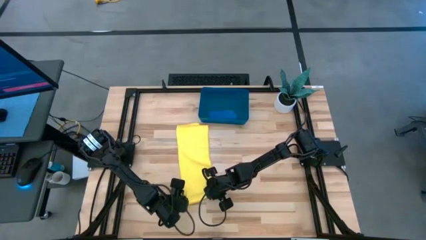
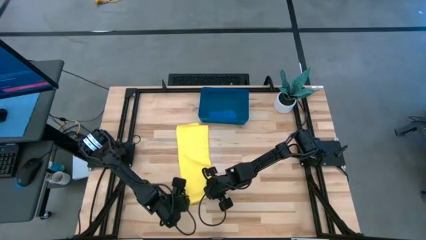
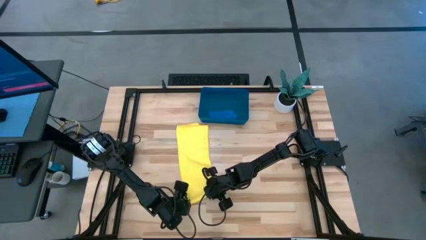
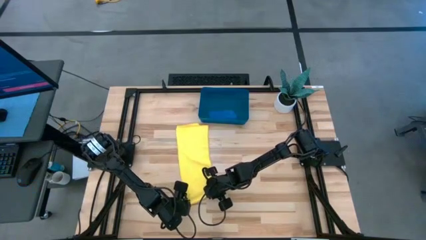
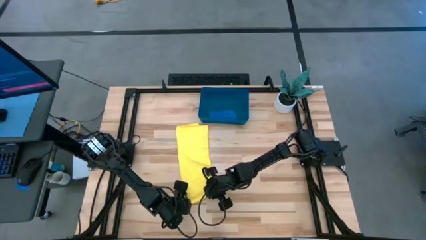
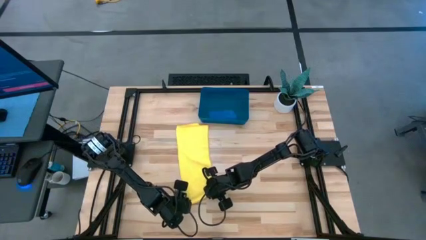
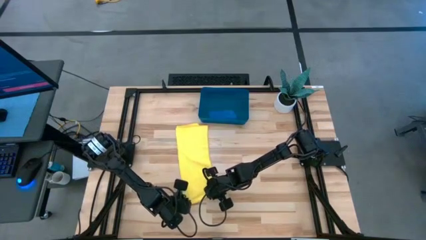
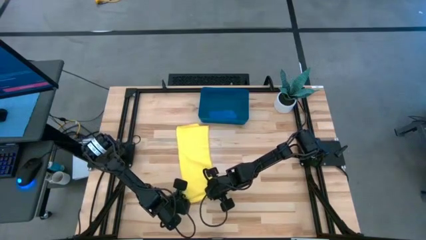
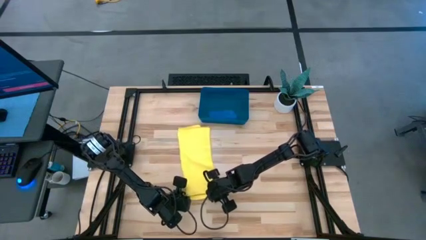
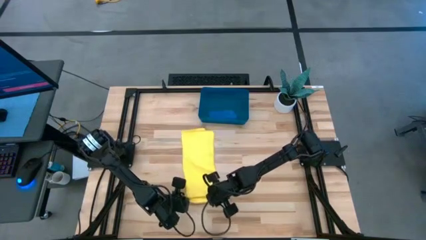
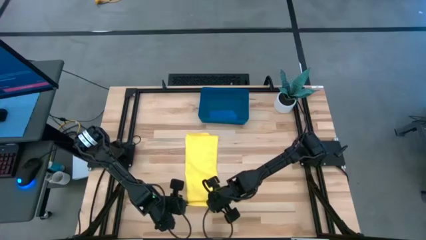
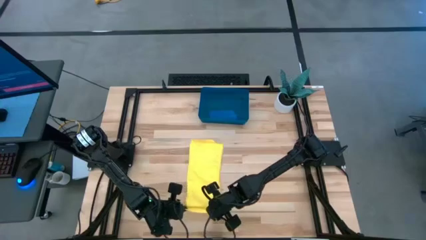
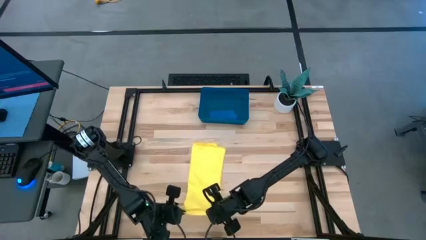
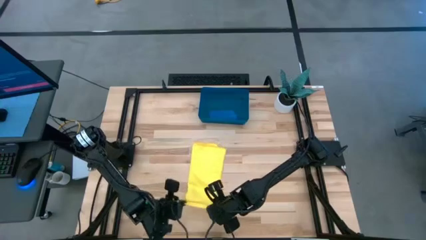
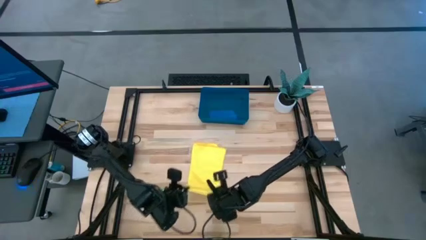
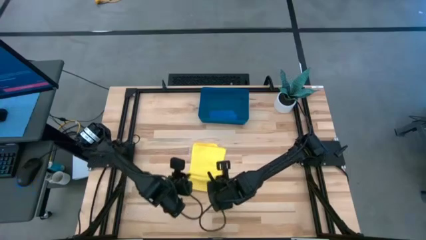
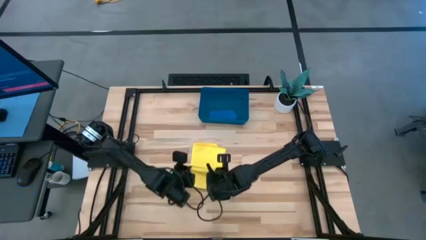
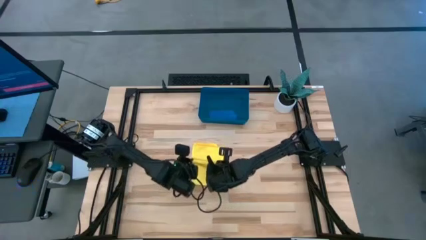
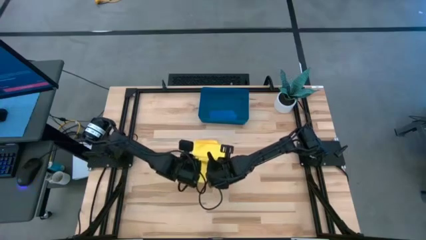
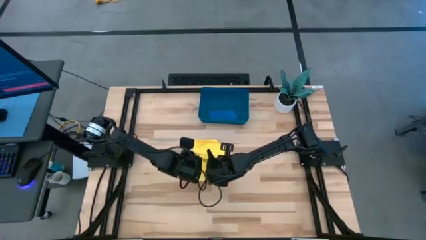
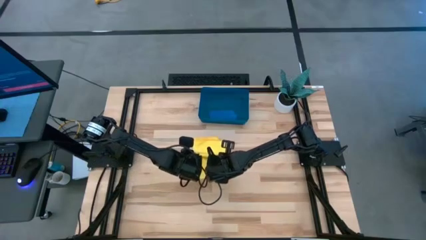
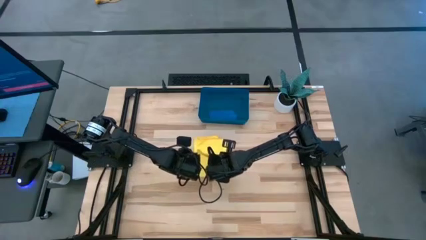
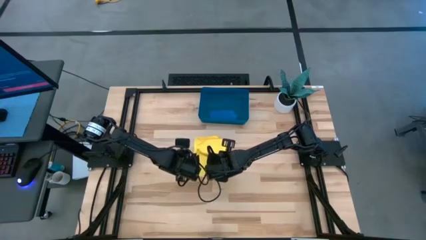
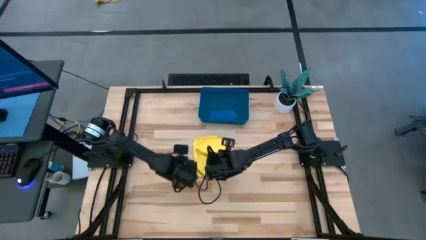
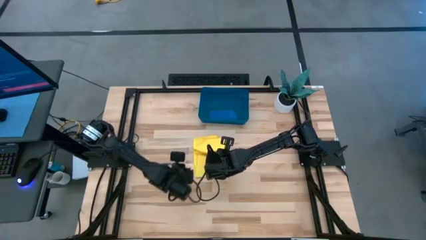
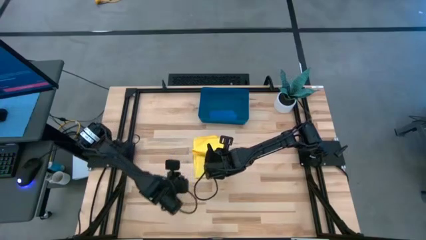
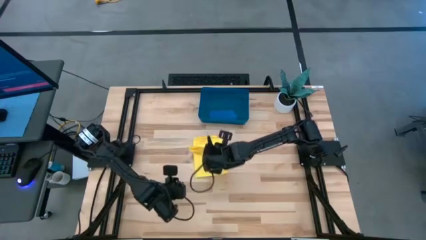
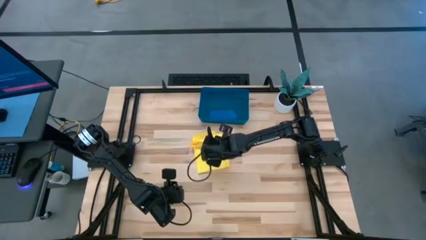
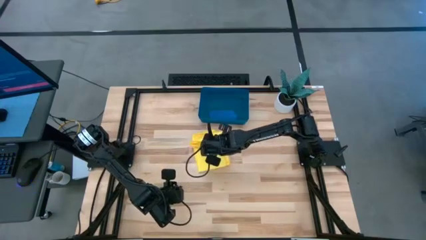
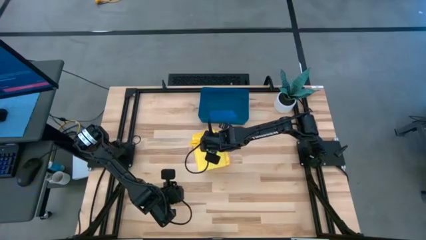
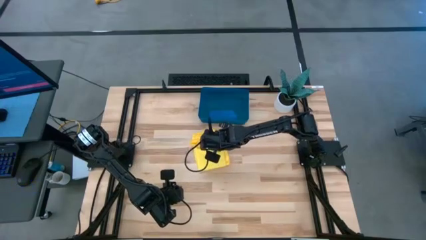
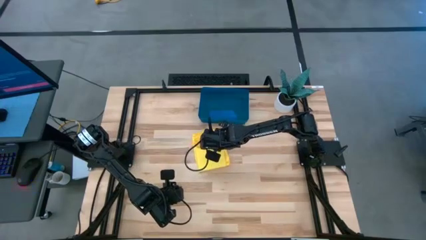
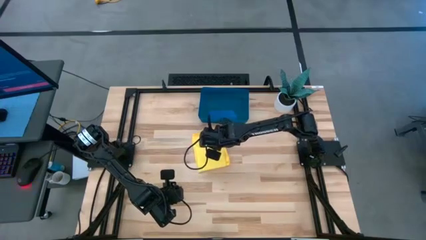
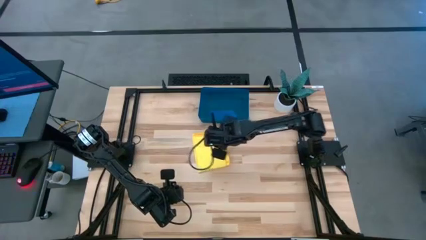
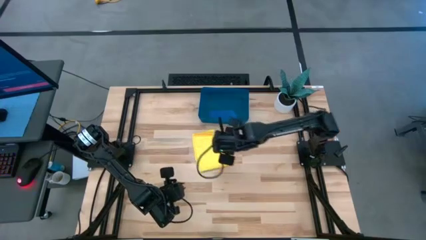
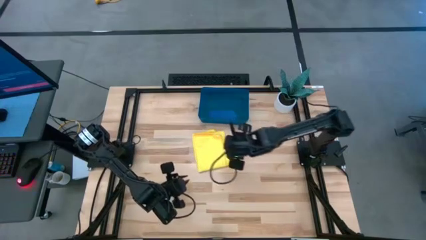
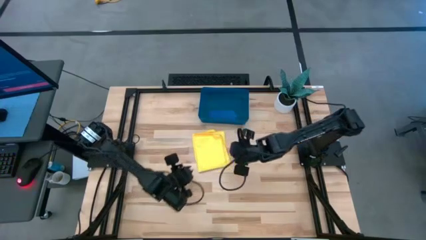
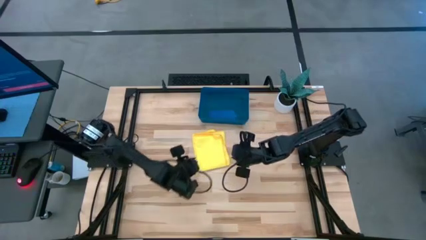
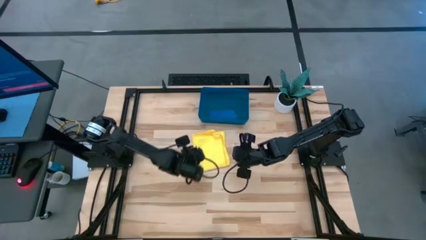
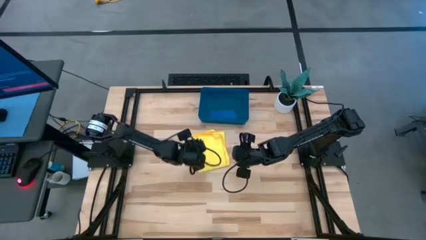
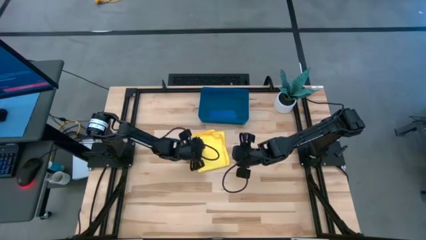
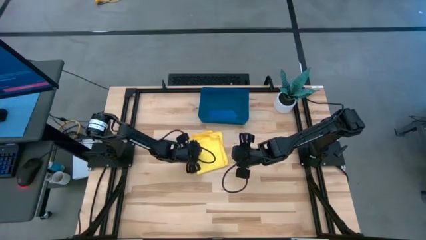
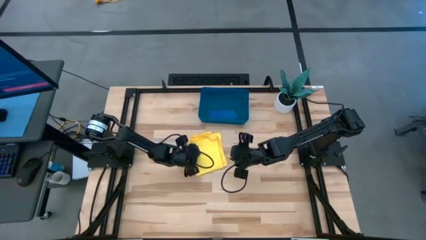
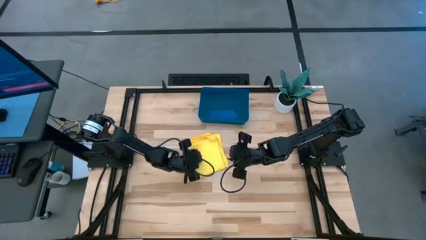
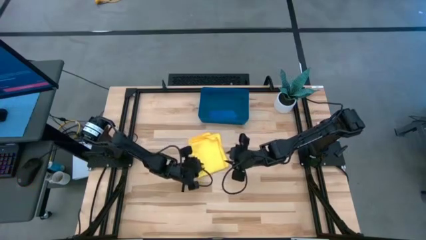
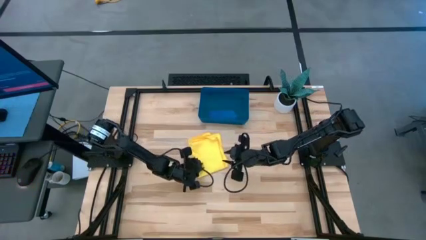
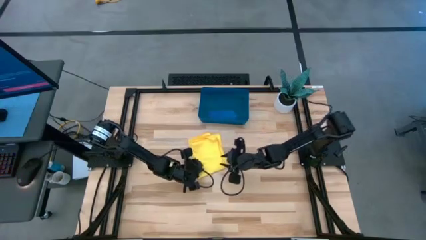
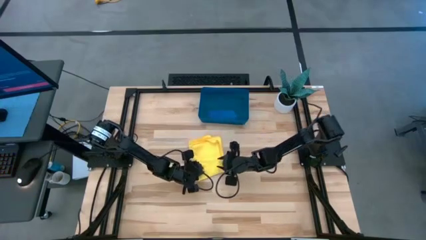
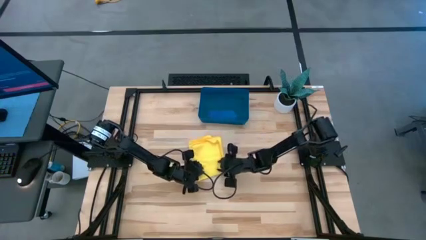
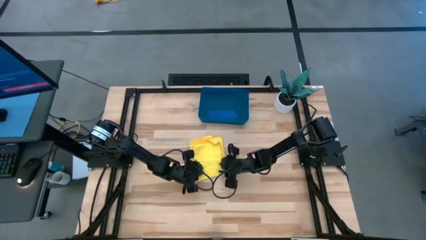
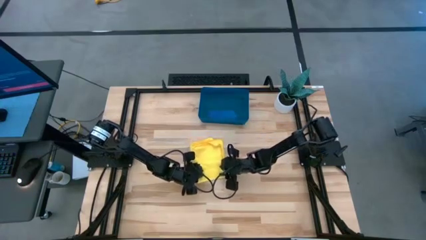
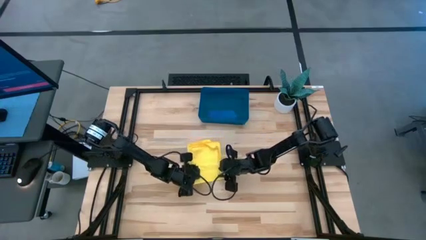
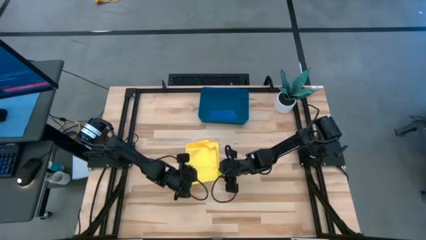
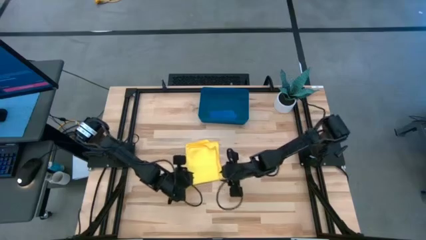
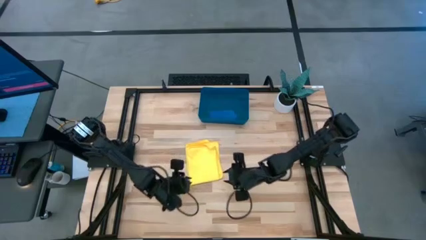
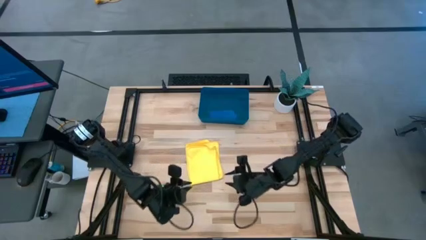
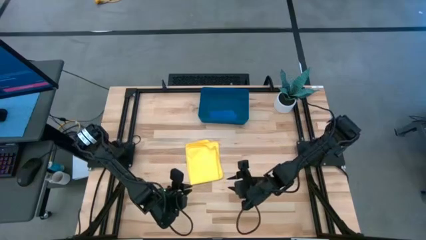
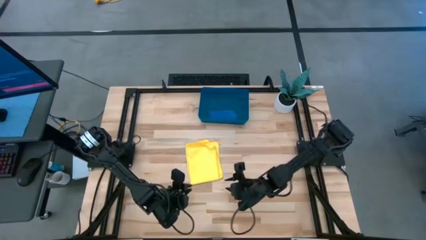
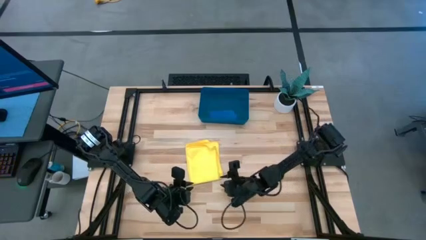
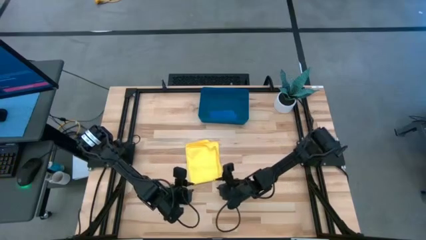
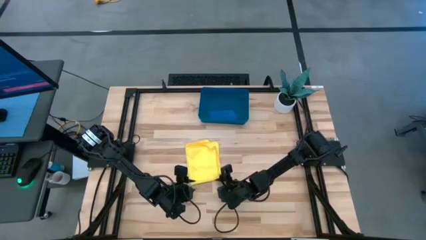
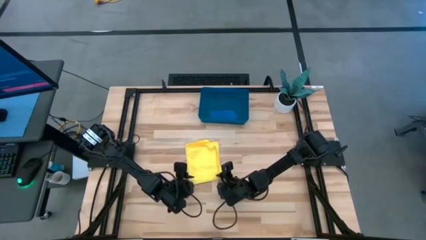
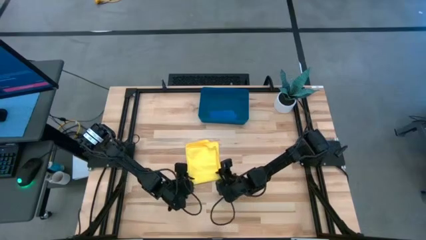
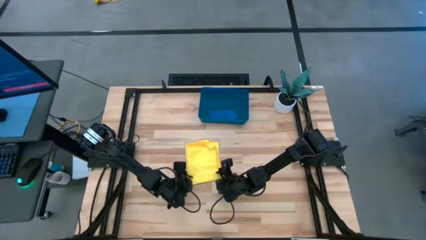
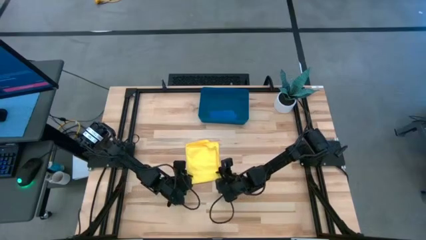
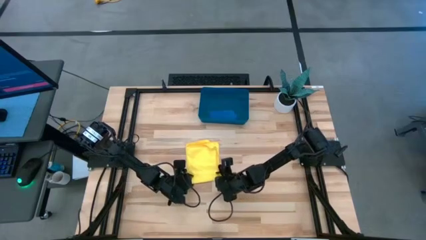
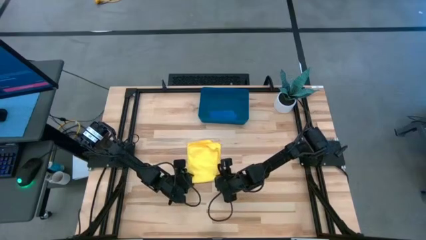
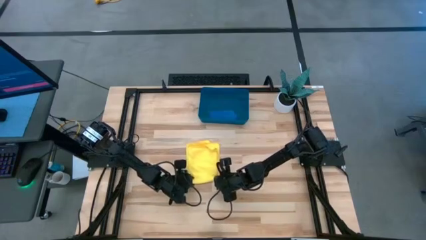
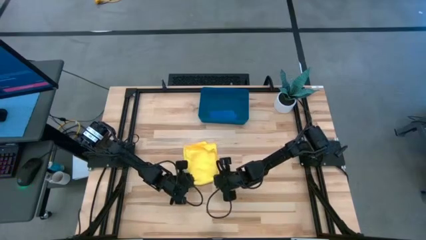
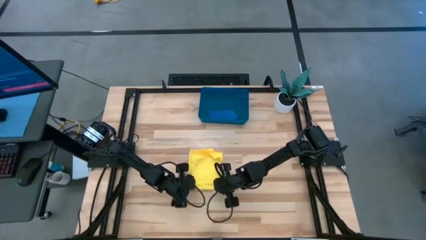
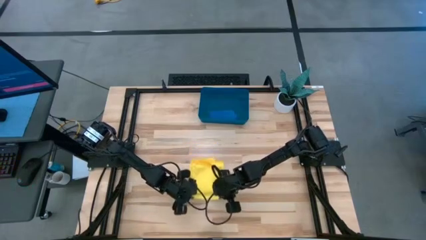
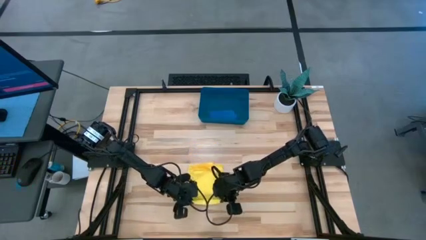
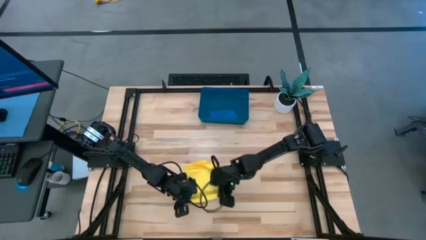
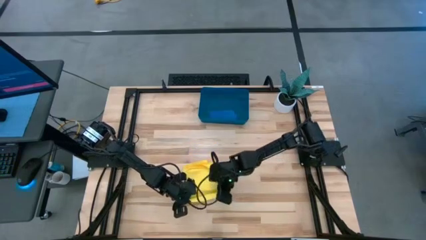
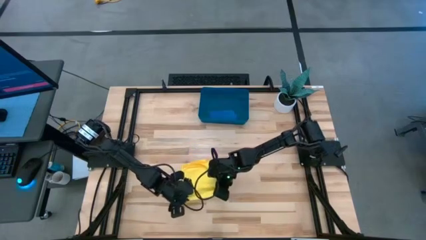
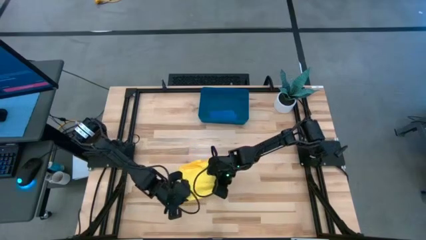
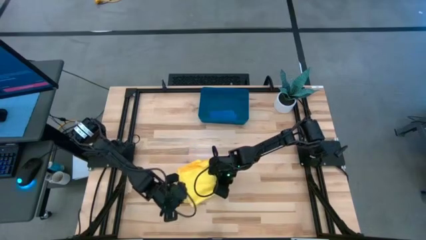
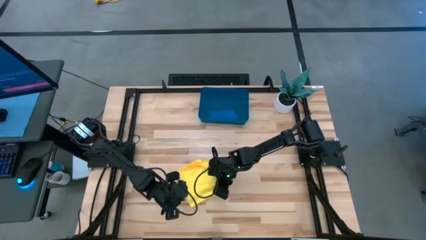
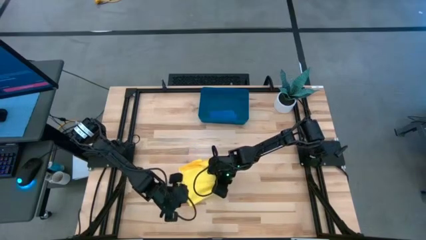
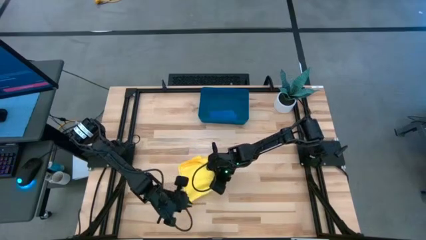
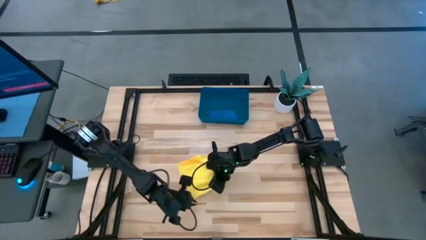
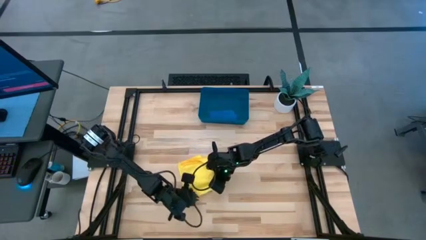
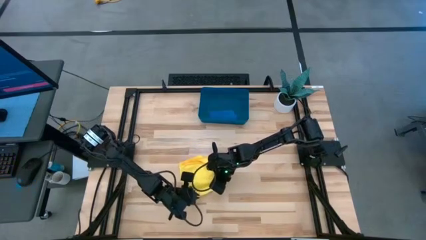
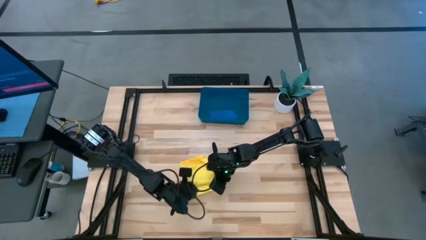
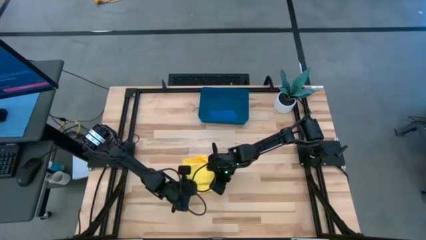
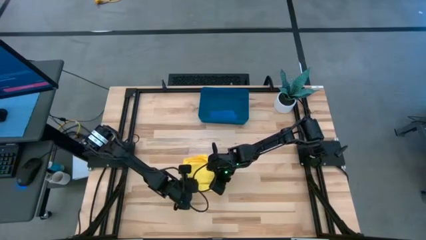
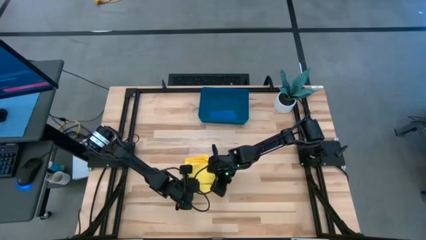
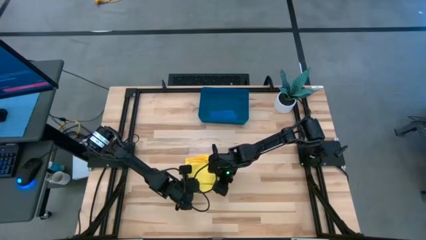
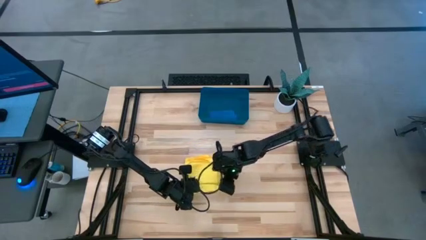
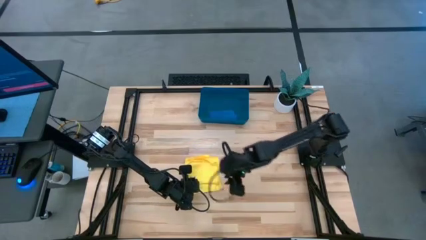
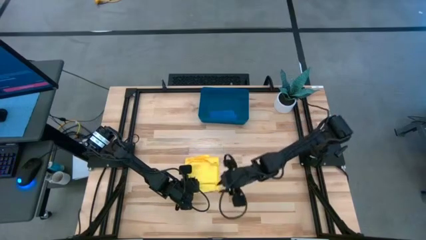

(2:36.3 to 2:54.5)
Task: Roll microfiber towels into tight, uniform cylinder then place into a basket
Roll the yellow microfiber cloth
